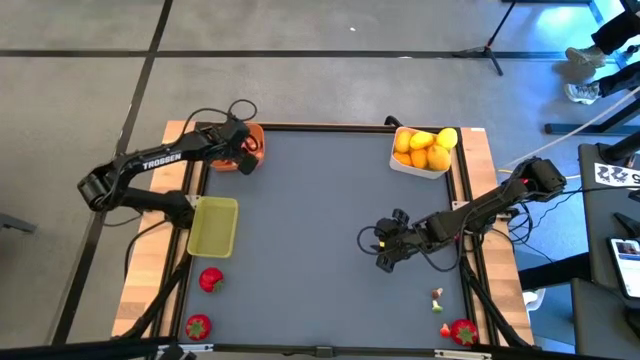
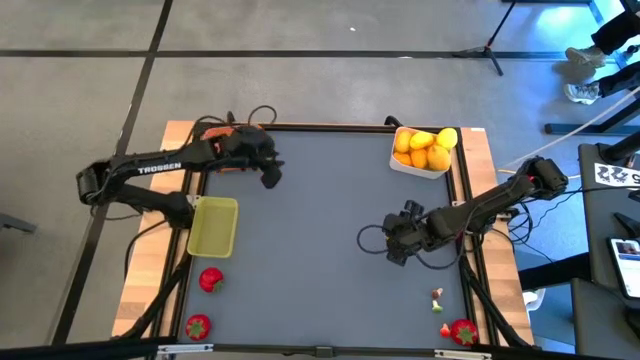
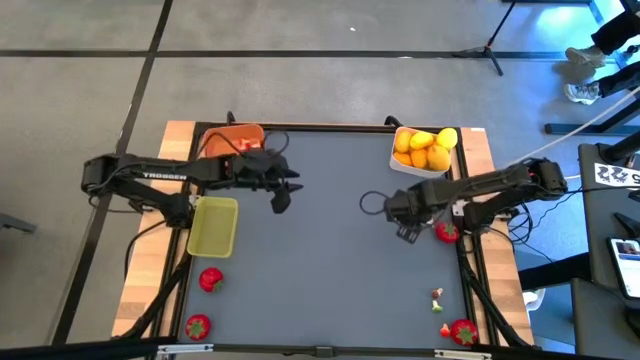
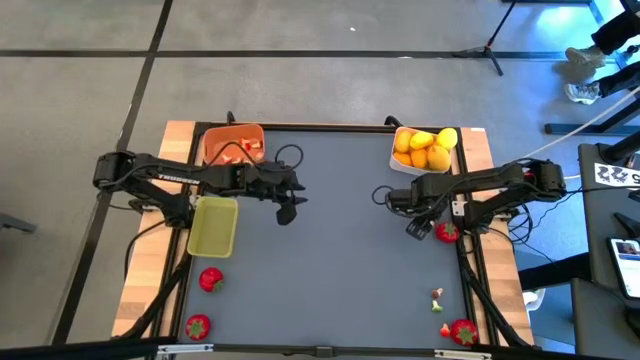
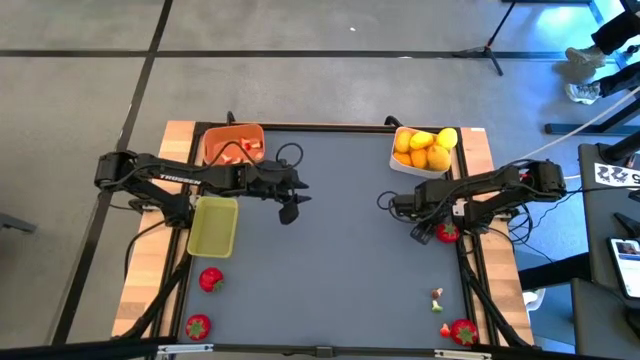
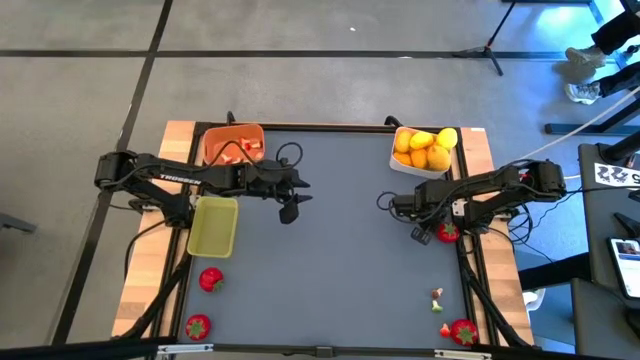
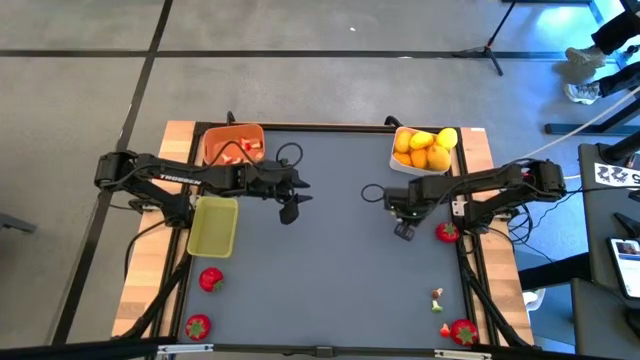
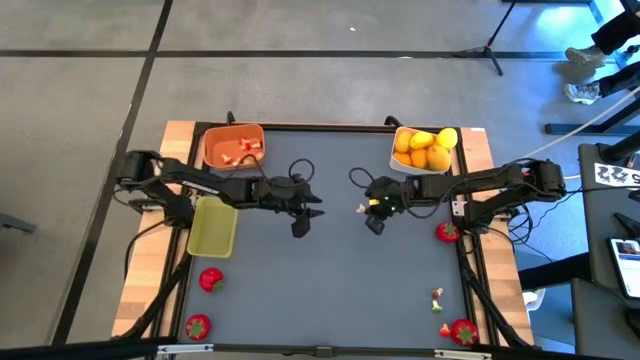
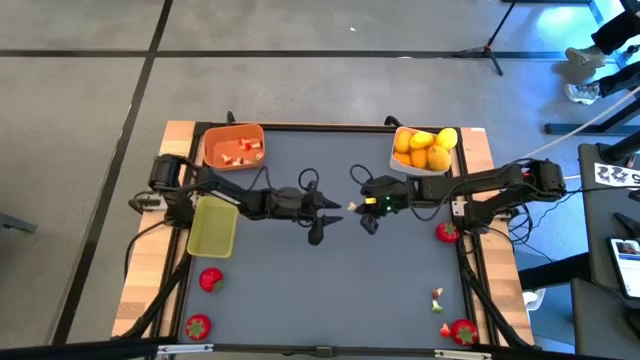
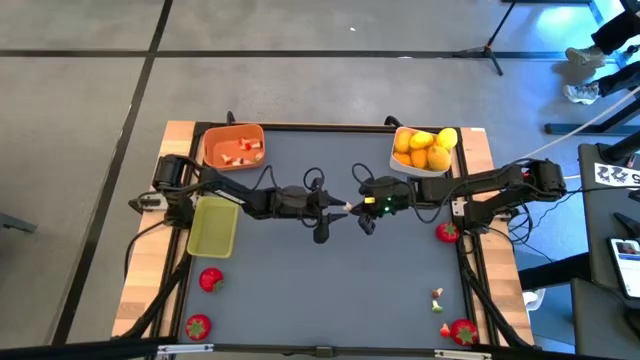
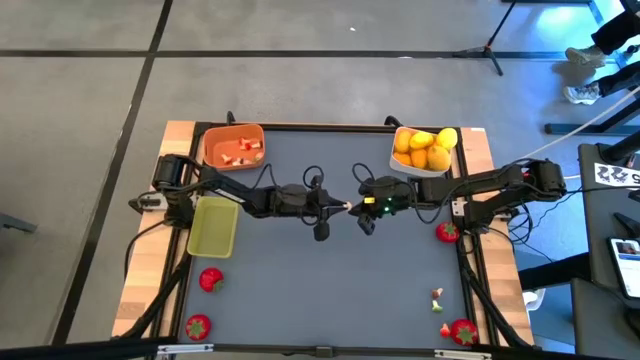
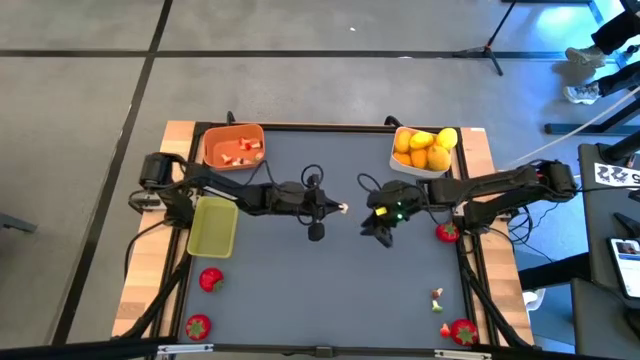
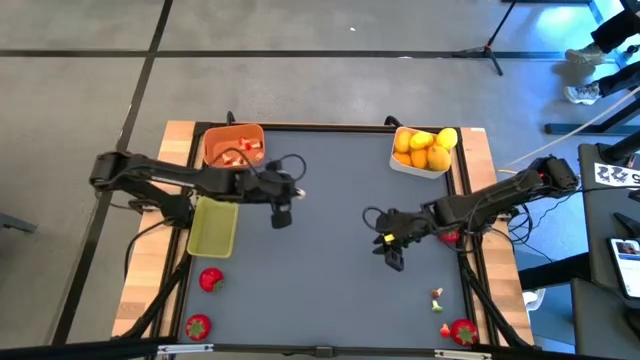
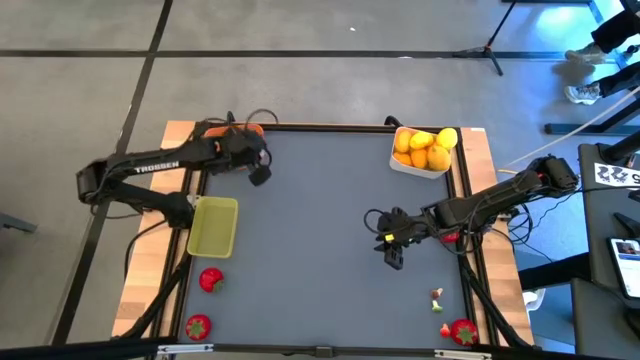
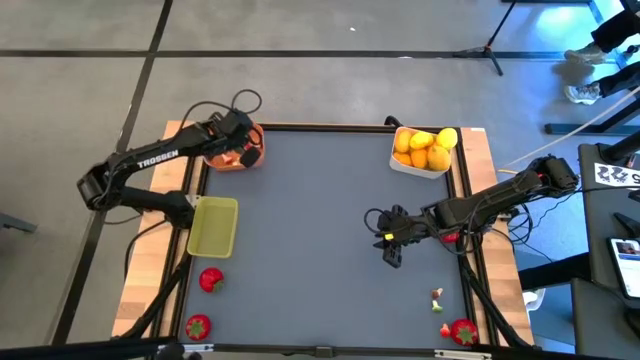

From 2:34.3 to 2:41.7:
Task: Sort produce into baskets
Put the brown mushroom into the orange bin

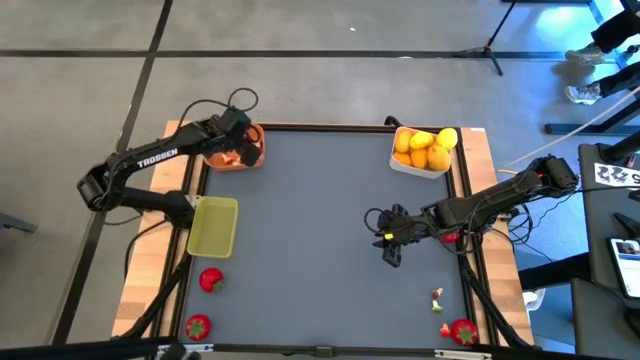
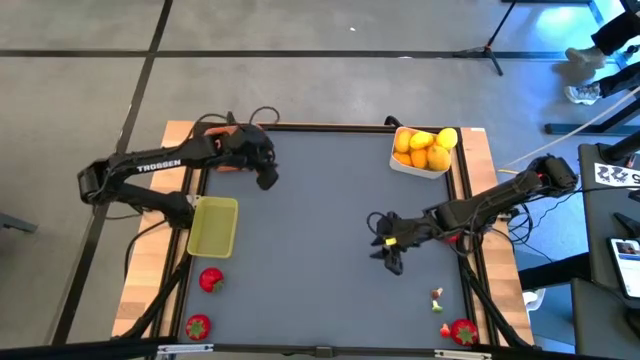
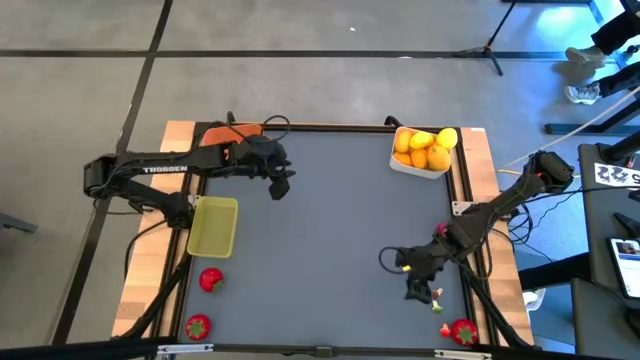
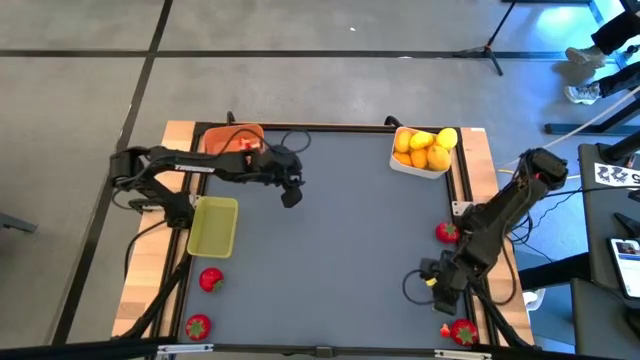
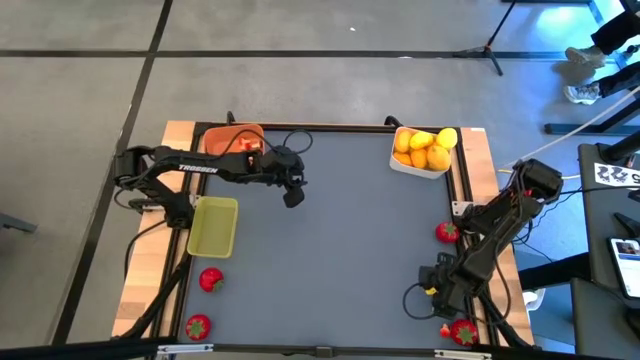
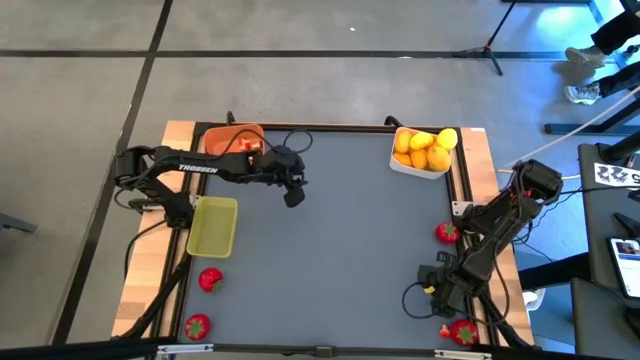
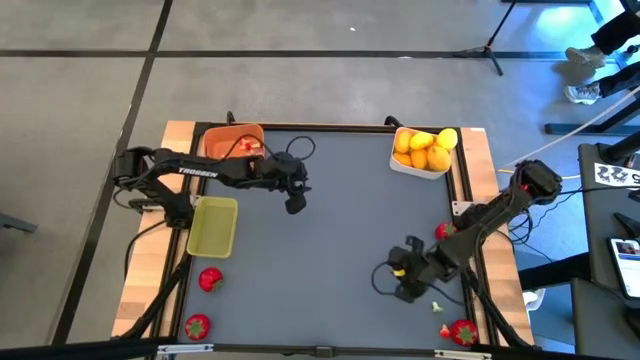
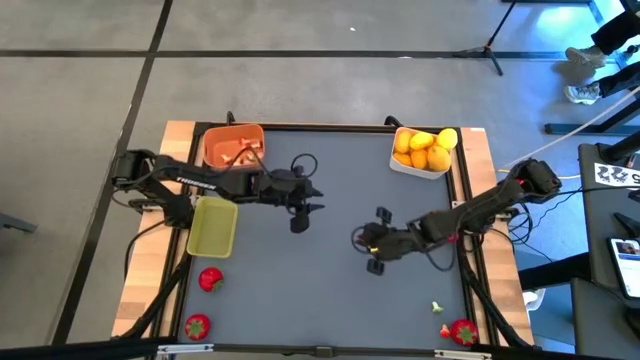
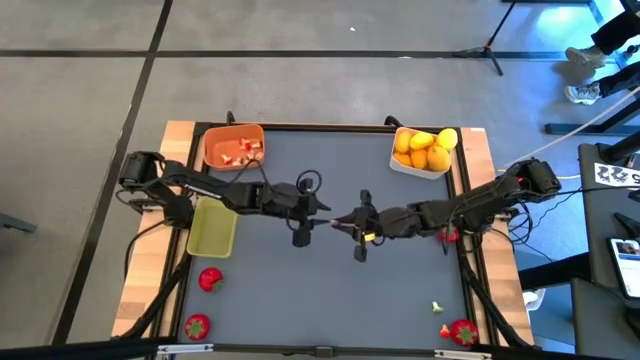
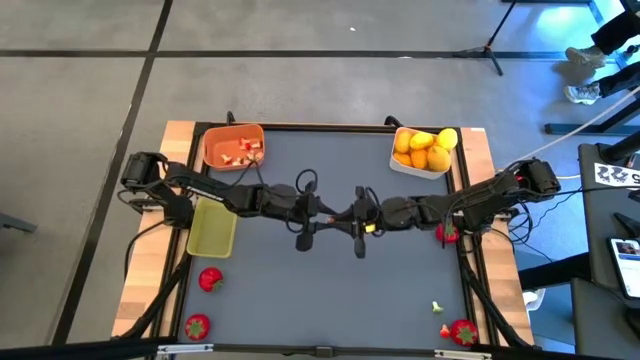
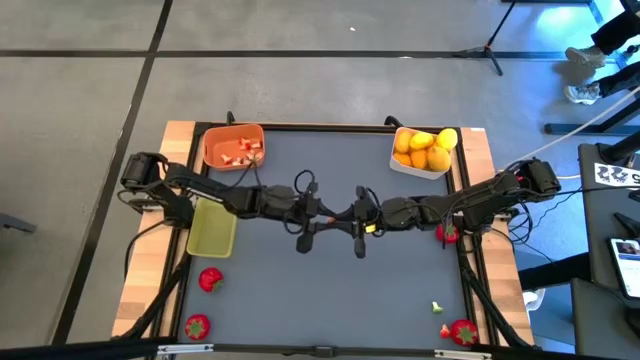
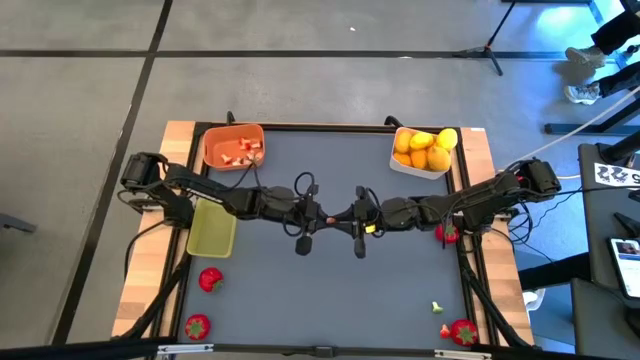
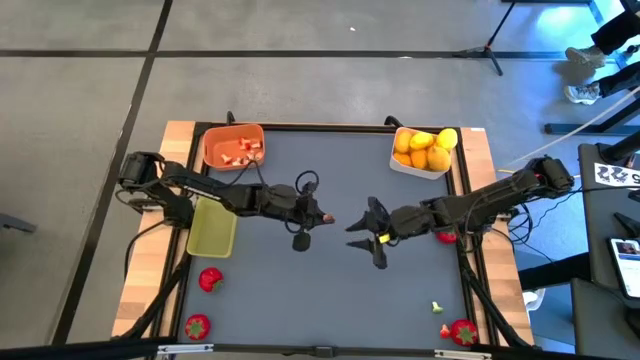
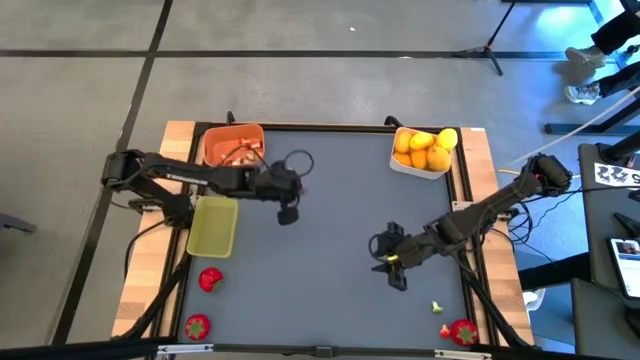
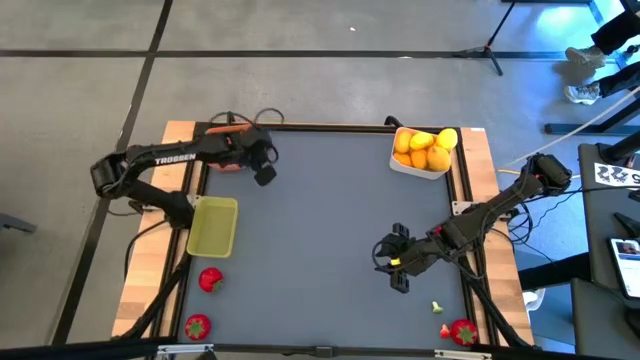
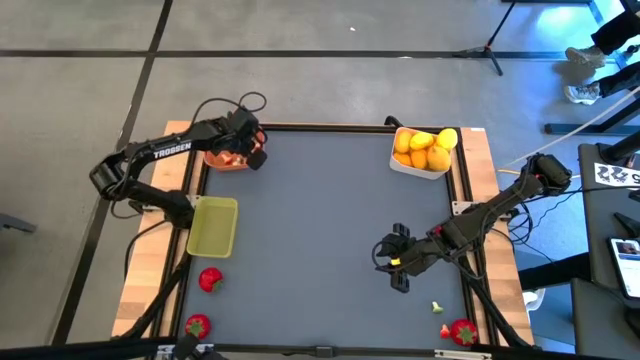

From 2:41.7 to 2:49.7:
Put the brown mushroom into the orange bin

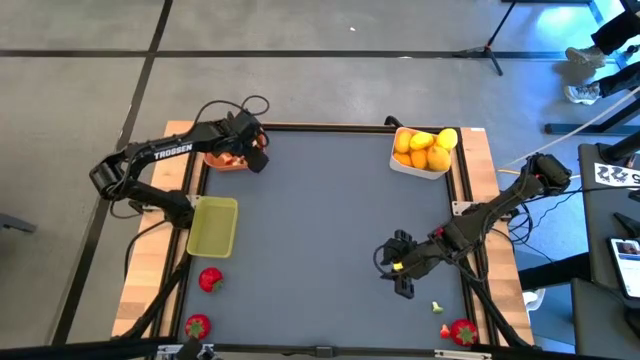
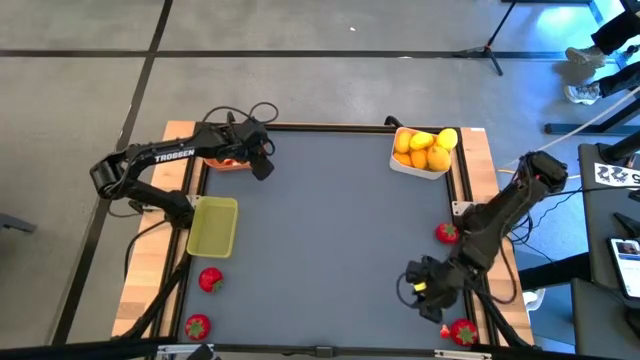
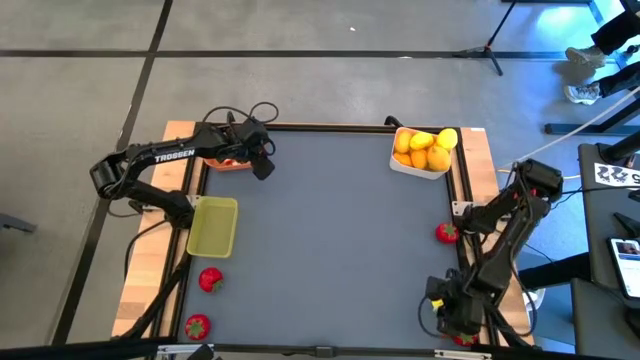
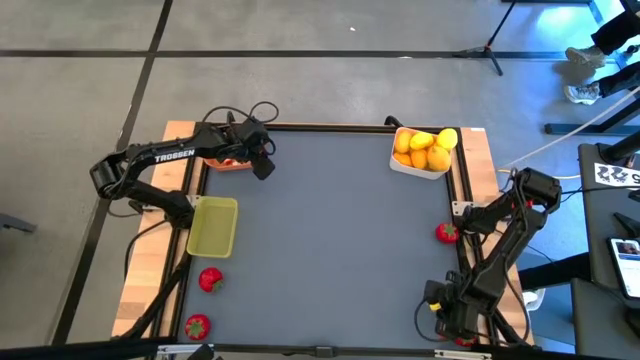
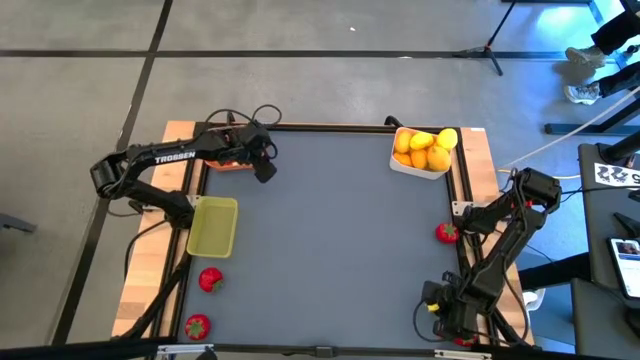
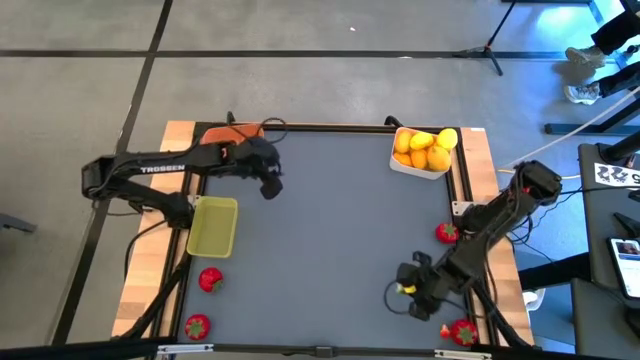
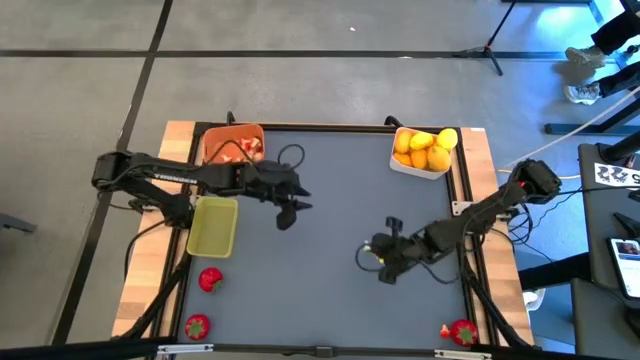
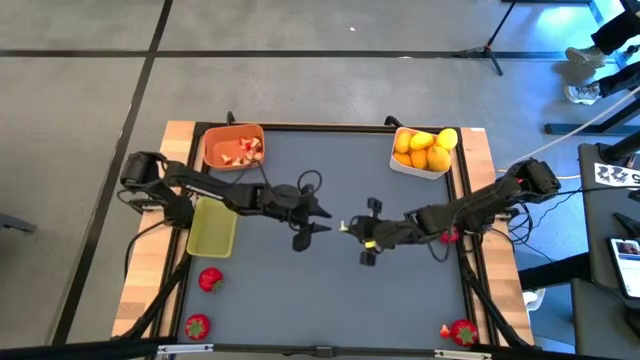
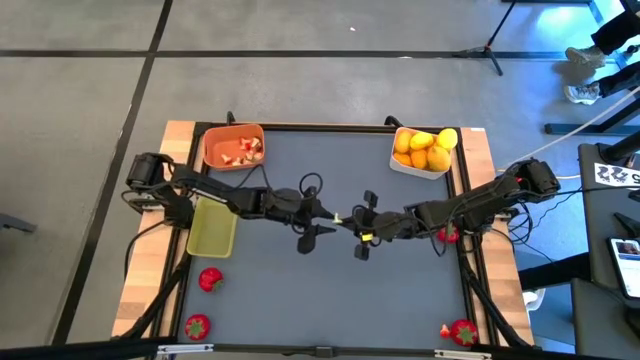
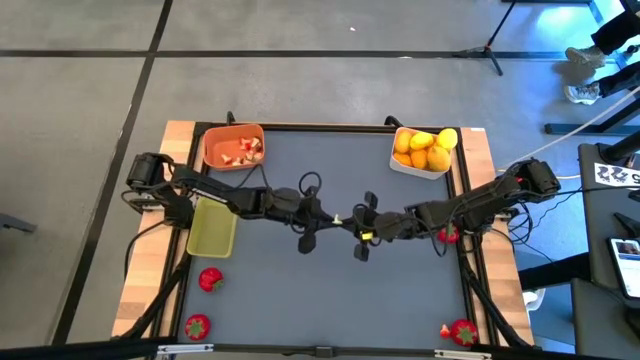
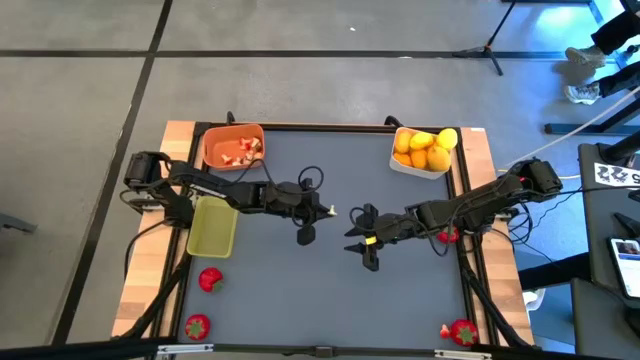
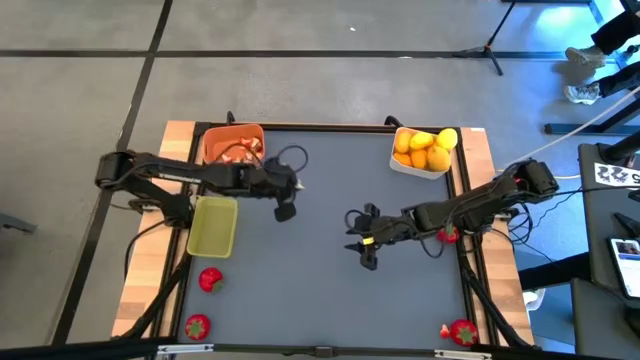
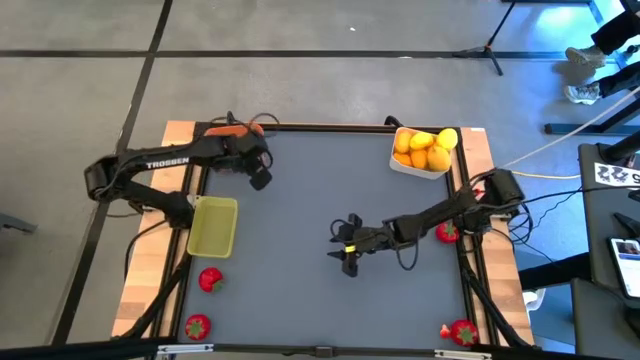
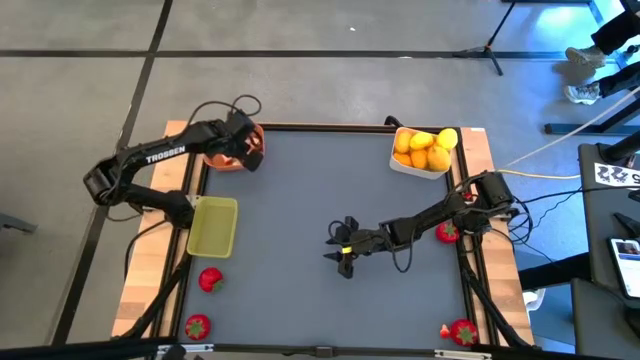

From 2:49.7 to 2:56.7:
Put the green mushroom into the orange bin
